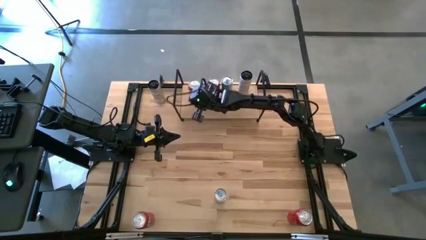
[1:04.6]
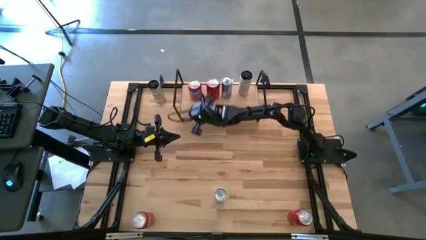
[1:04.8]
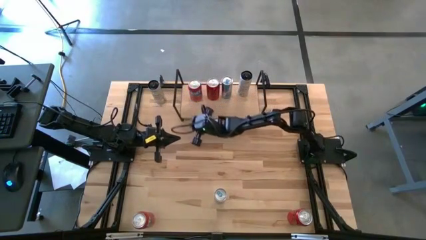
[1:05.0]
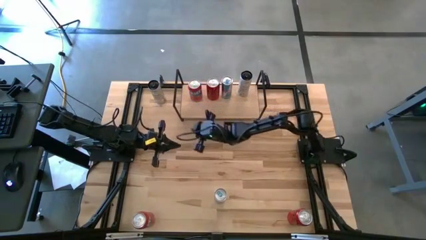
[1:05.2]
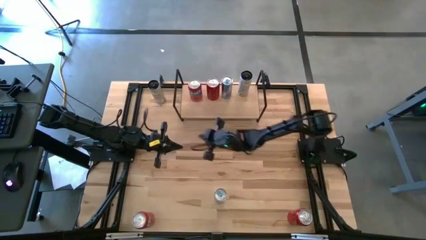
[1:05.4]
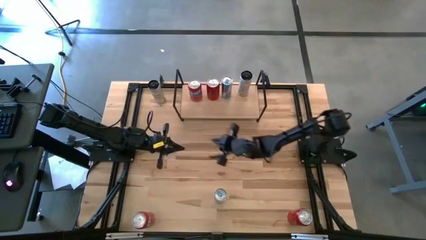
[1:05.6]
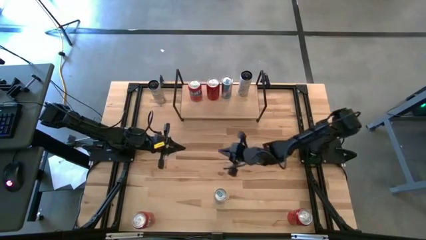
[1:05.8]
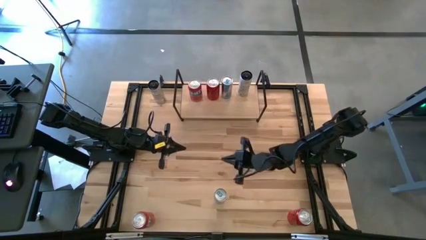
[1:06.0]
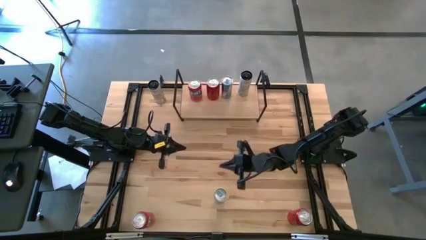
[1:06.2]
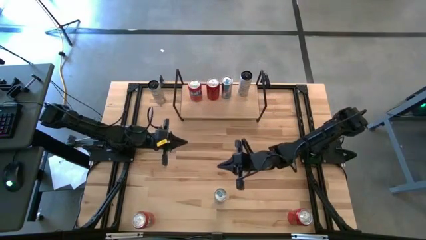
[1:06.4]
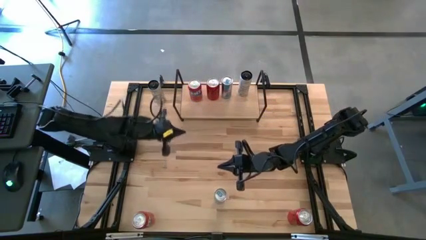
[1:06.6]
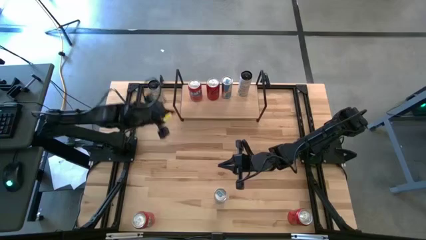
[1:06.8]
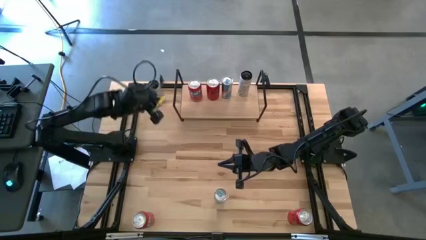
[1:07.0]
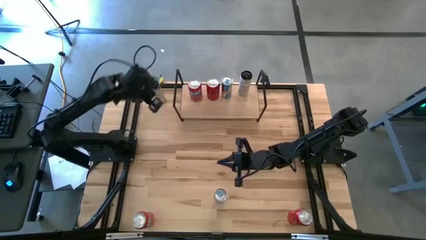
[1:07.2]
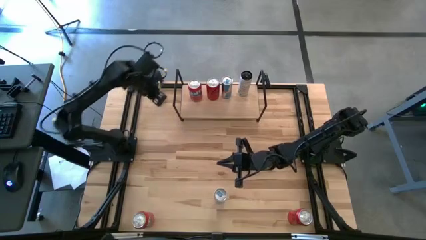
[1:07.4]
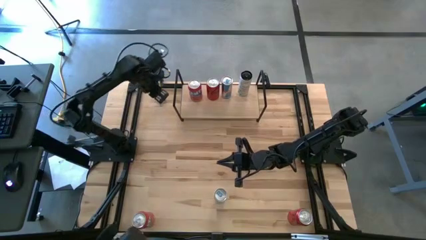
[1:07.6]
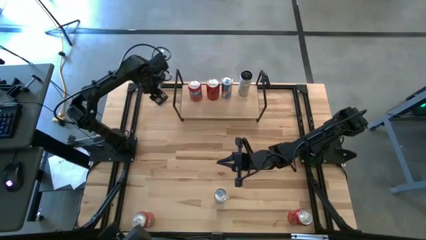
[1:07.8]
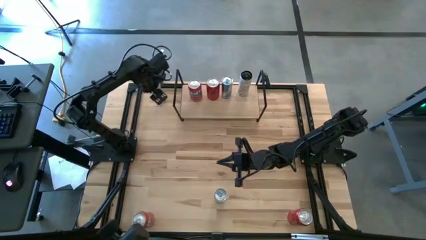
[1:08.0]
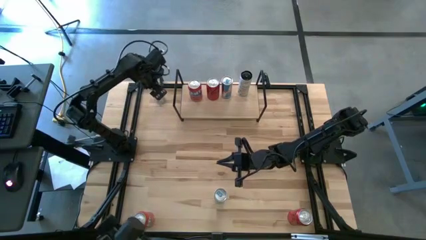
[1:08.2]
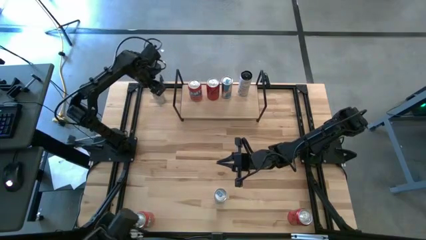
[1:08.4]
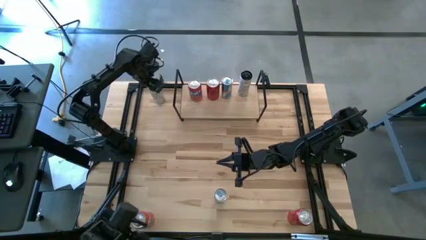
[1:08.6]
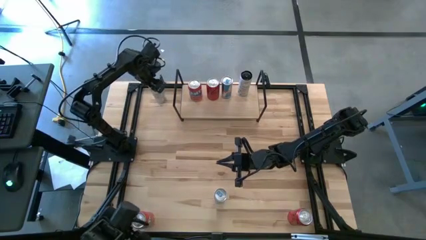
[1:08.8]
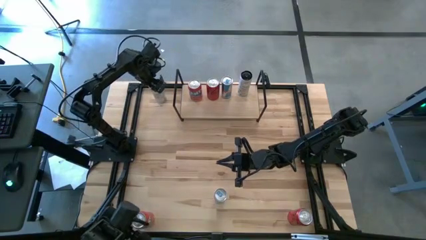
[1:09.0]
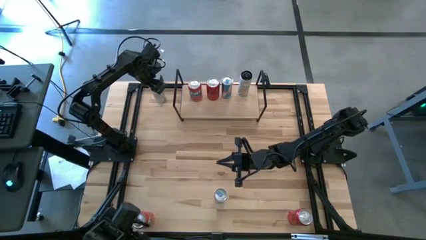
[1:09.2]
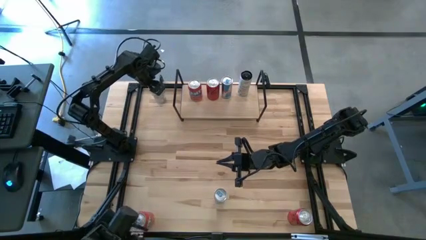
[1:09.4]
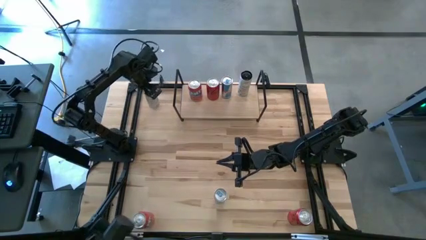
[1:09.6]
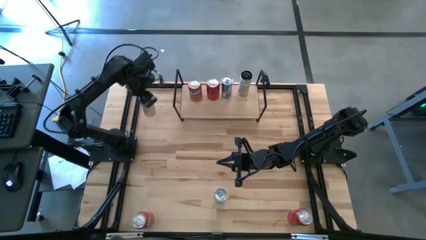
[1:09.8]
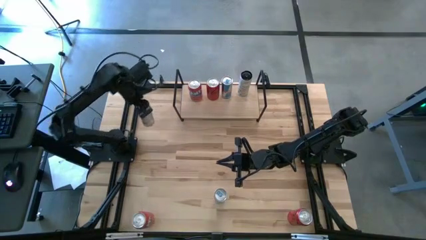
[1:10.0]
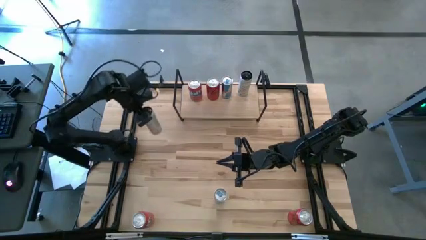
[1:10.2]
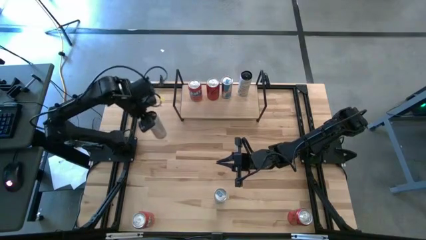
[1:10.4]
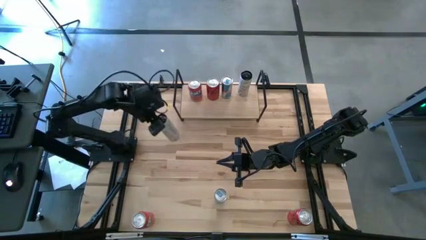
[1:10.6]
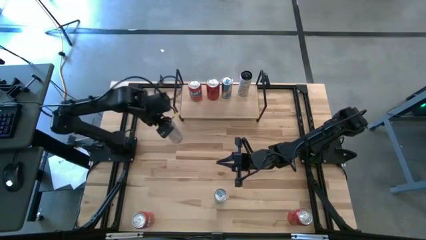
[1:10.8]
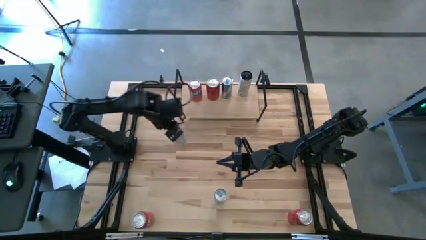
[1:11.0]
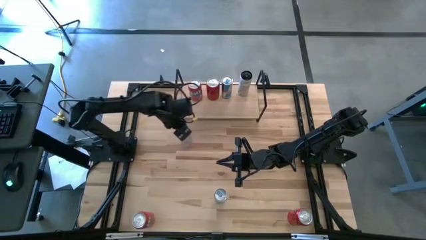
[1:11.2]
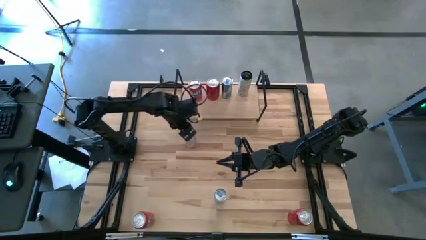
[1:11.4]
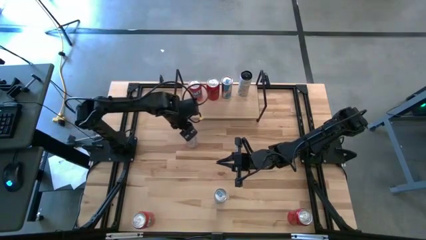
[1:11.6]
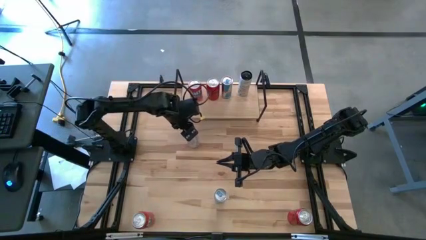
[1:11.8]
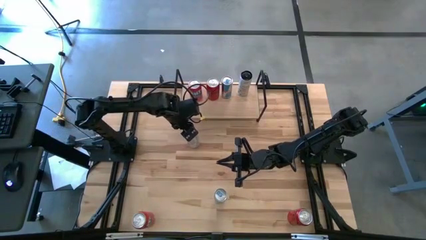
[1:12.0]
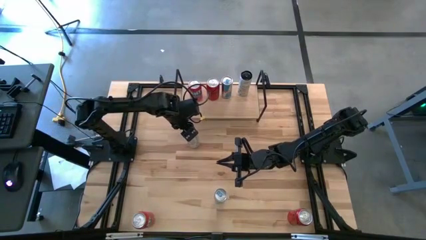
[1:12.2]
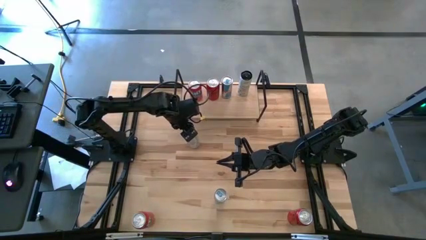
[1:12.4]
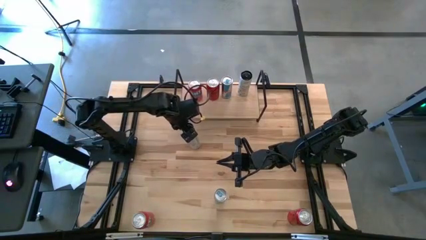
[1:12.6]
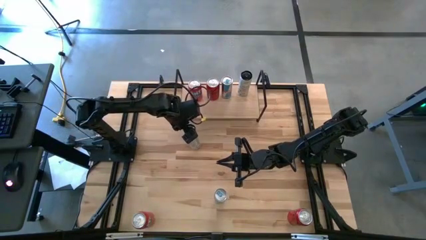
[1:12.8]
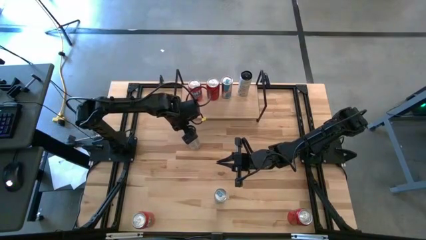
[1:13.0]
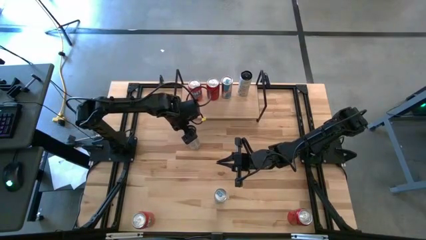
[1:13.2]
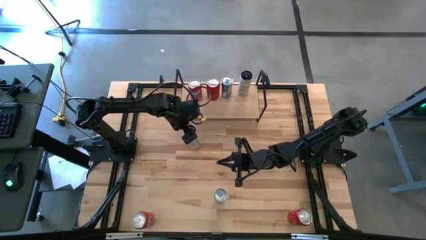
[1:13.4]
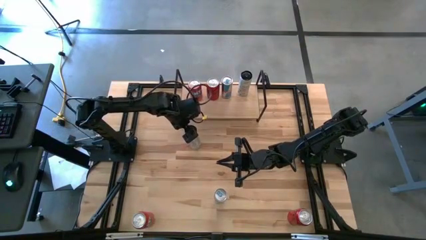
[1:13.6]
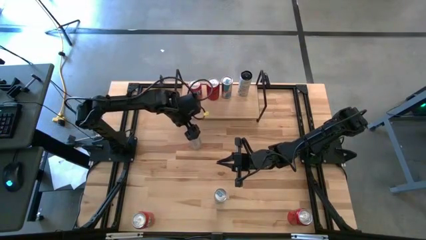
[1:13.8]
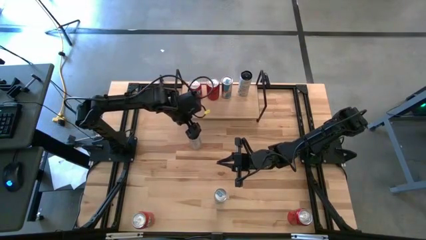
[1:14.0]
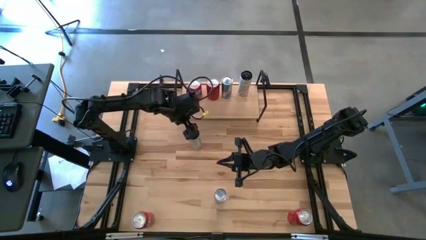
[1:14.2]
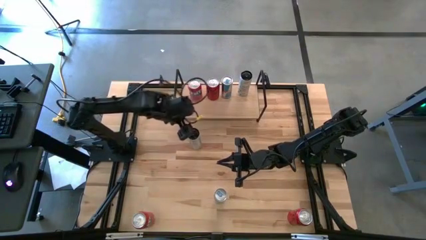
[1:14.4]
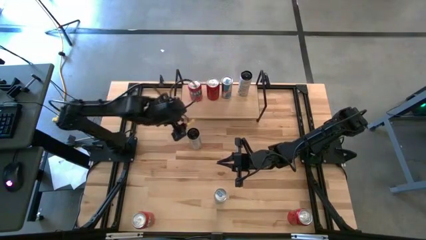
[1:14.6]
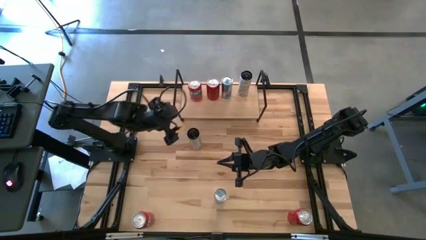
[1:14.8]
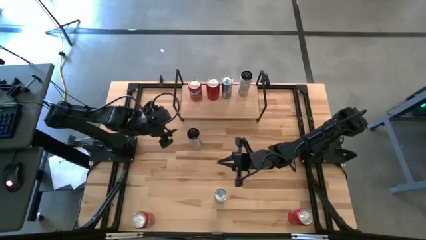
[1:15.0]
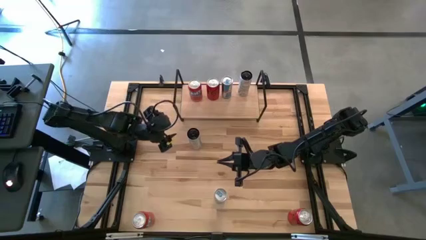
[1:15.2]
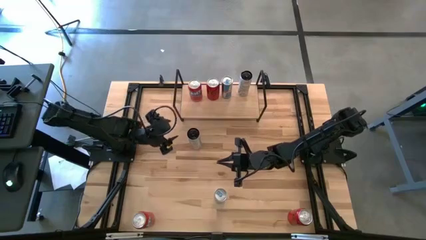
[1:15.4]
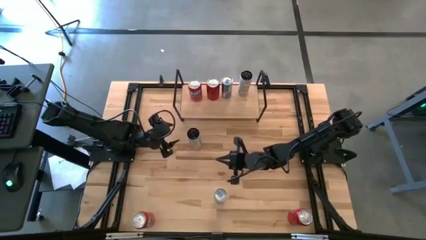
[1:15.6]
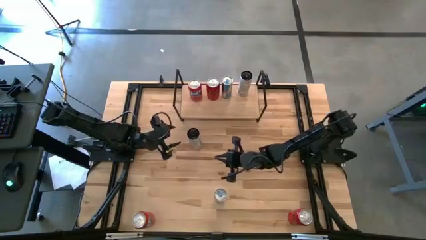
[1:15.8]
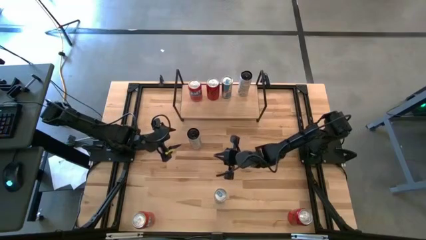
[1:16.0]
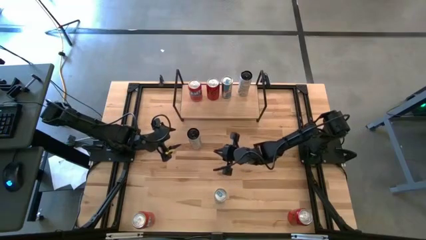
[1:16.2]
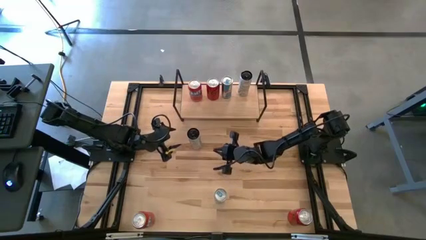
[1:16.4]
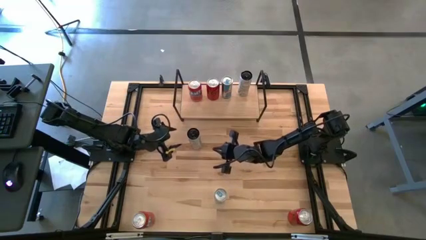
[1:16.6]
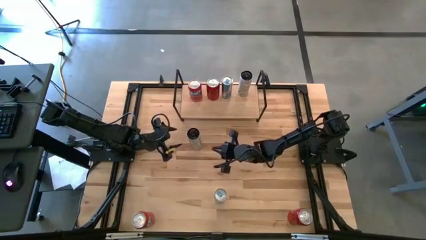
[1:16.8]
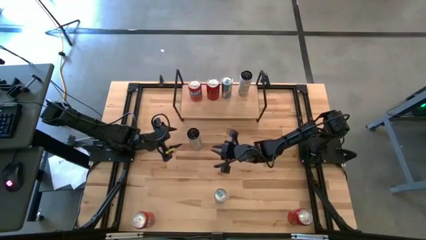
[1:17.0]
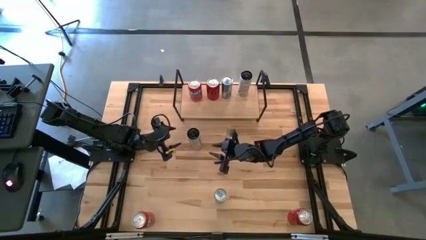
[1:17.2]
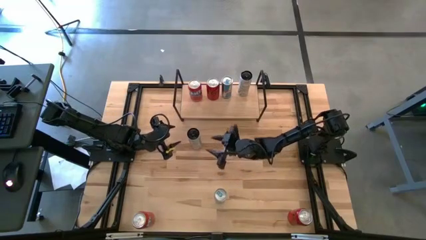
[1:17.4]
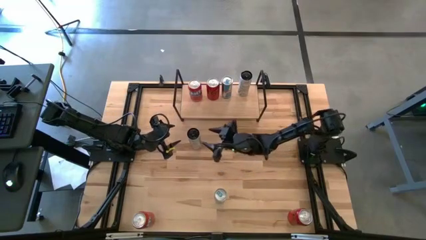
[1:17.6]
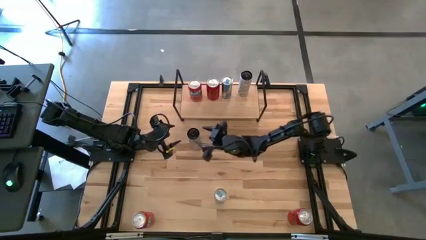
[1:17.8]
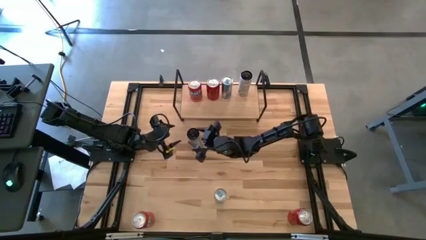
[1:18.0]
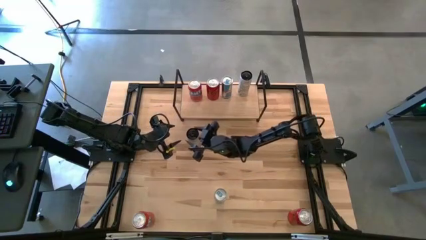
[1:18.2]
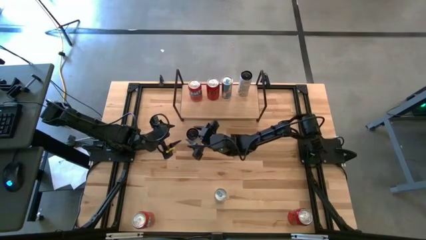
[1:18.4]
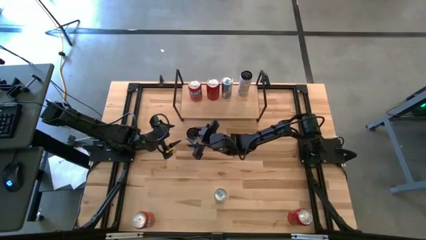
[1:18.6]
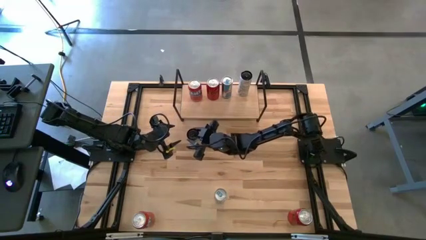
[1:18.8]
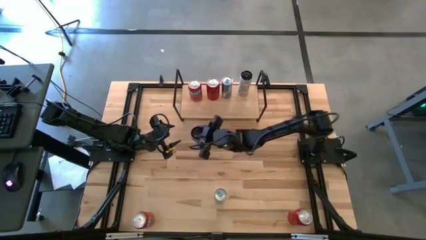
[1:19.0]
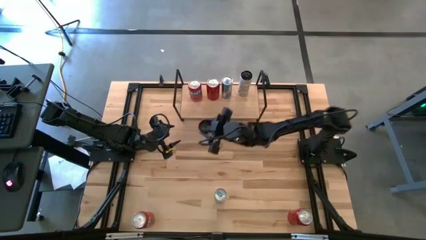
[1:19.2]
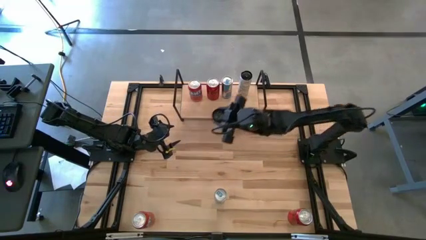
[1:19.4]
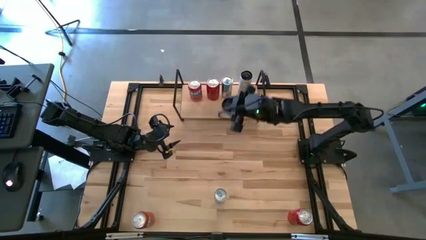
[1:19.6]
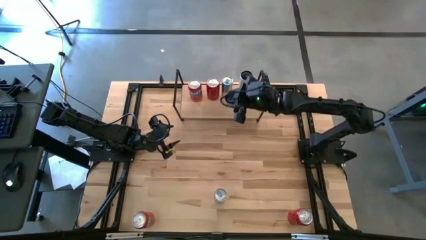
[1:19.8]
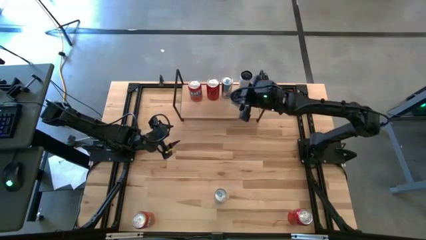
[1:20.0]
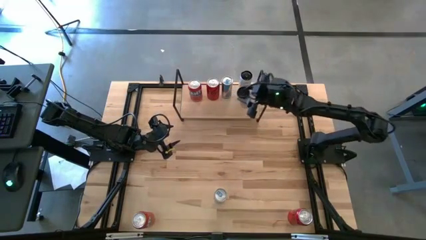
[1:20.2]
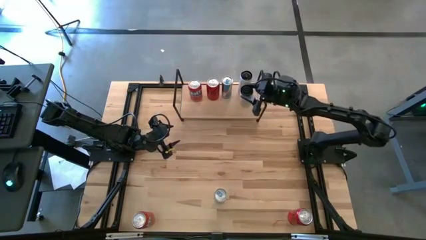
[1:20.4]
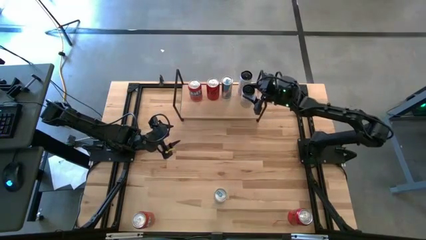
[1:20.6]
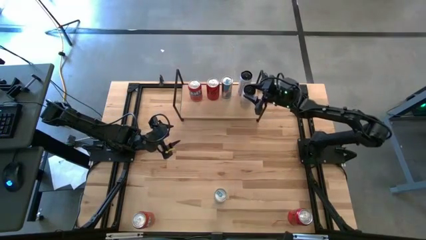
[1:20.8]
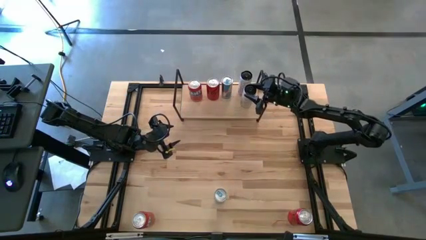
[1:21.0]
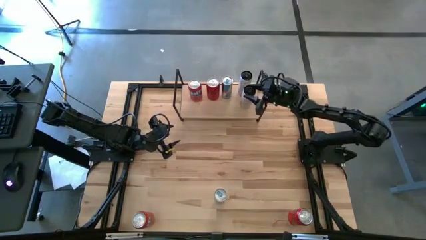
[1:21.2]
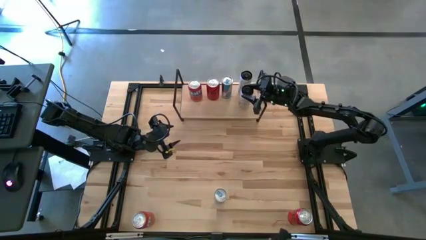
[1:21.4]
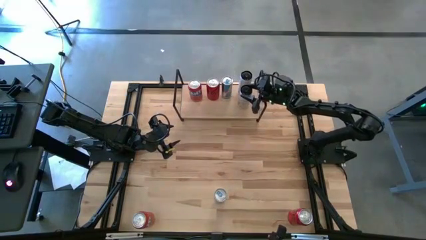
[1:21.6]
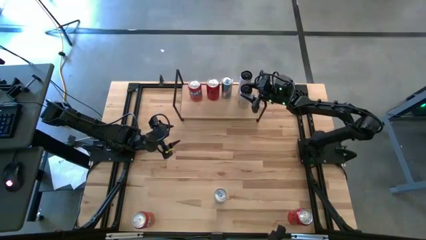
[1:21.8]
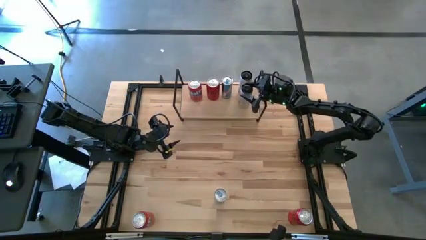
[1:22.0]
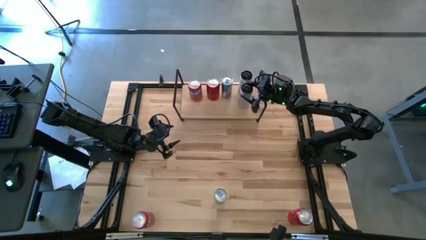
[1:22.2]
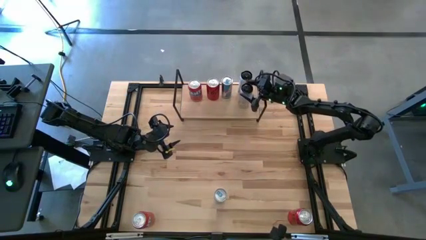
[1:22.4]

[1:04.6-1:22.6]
Task: Place canned beverage on shelf
Put the white yellow soda can on the shelf and align with the other white yellow soda can
